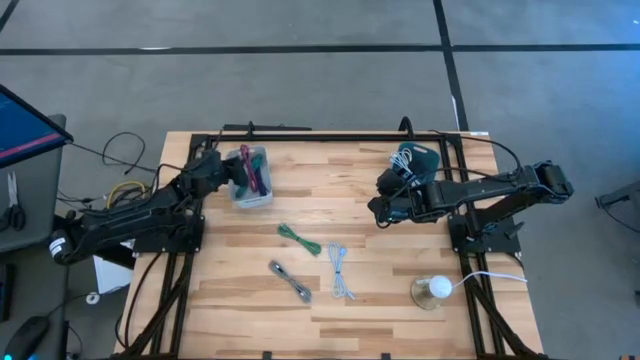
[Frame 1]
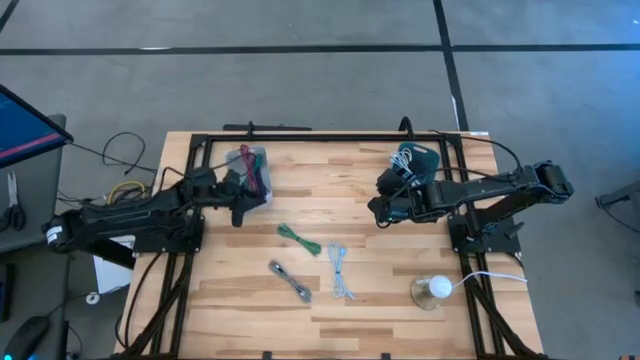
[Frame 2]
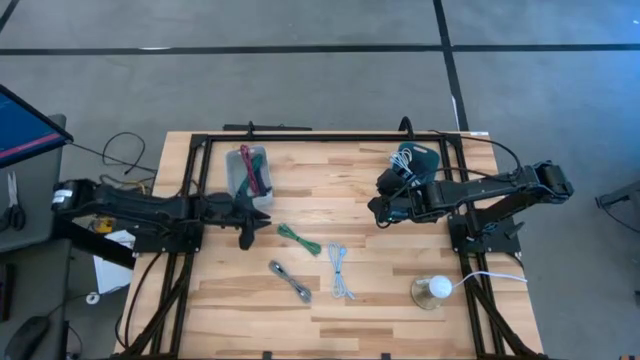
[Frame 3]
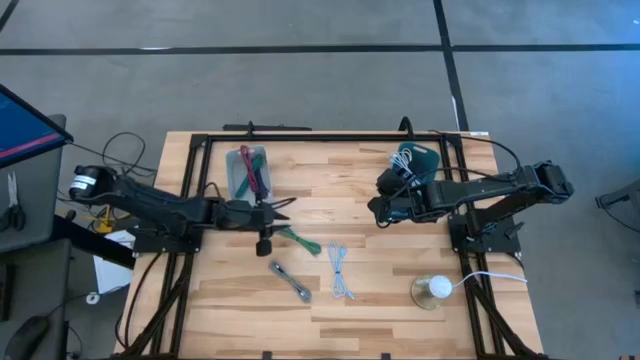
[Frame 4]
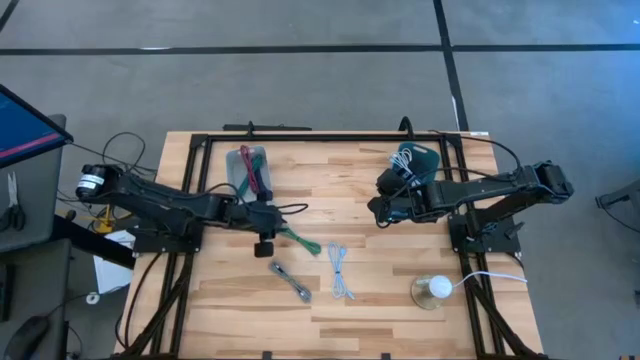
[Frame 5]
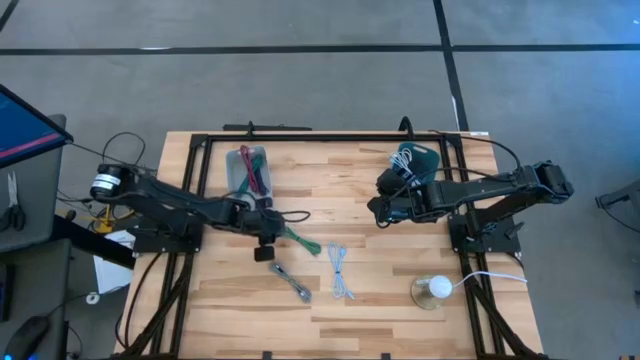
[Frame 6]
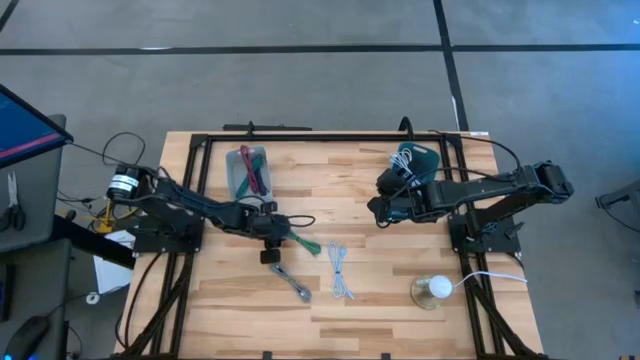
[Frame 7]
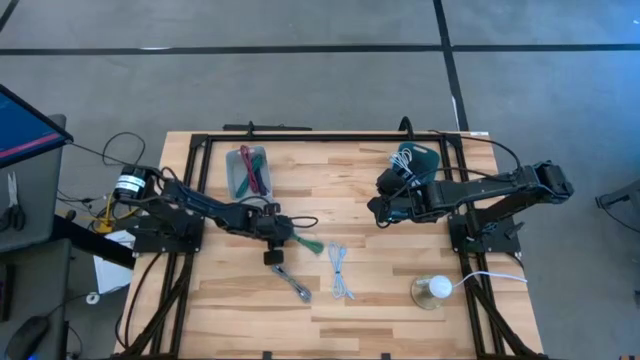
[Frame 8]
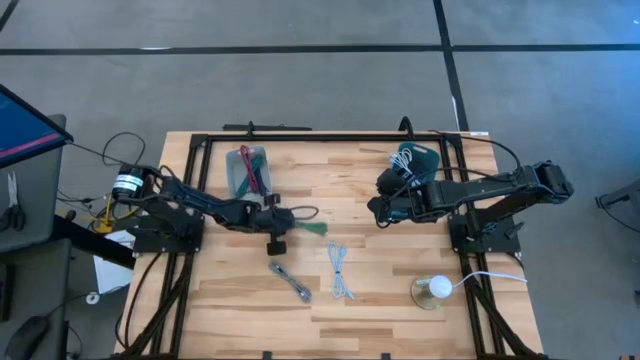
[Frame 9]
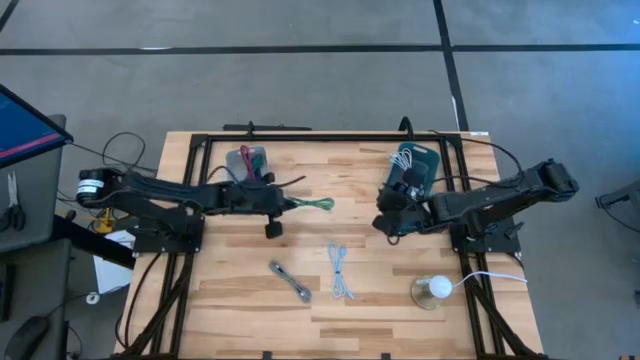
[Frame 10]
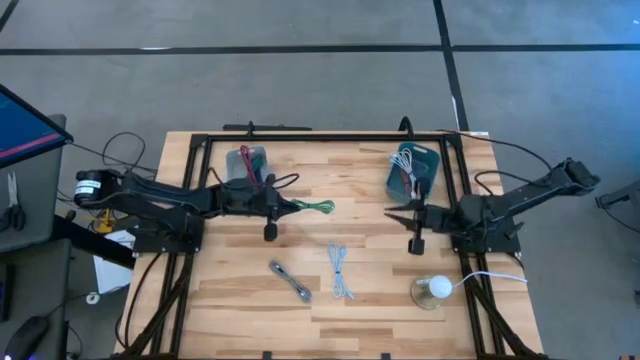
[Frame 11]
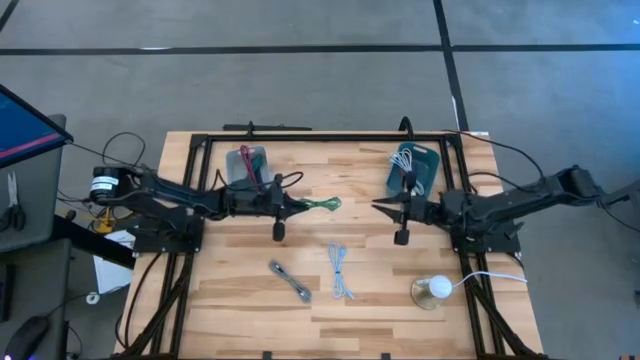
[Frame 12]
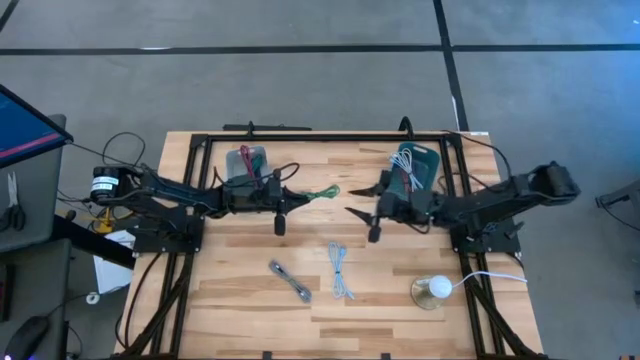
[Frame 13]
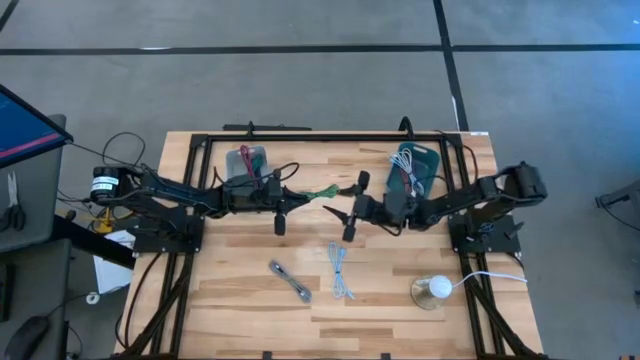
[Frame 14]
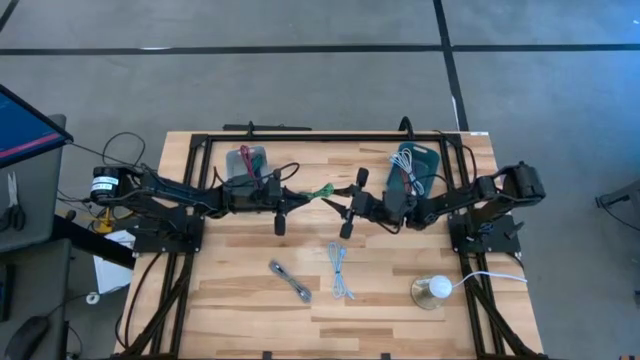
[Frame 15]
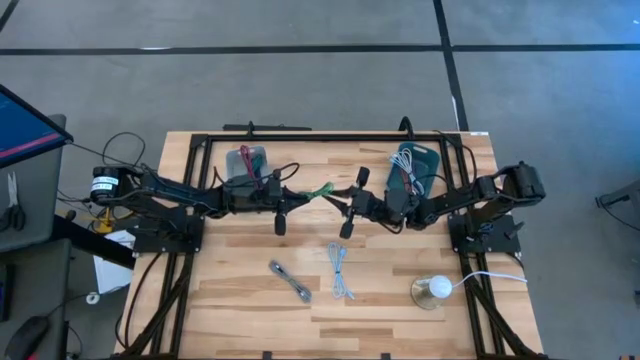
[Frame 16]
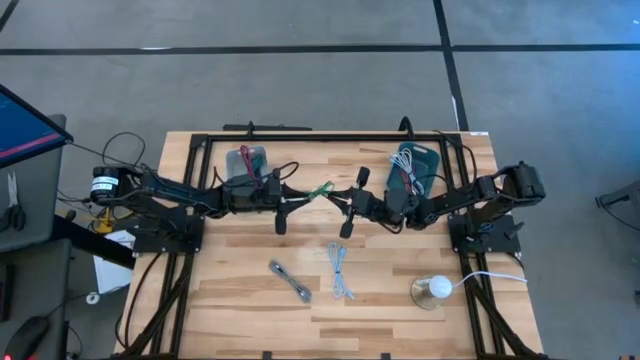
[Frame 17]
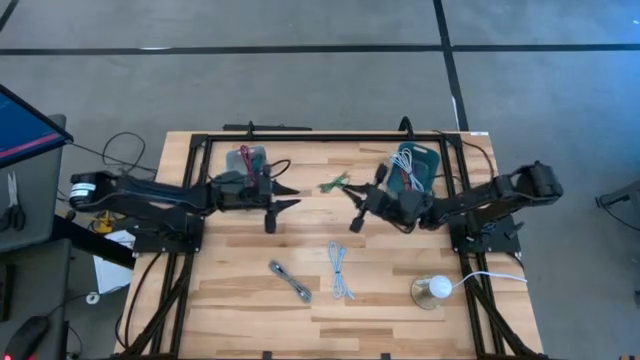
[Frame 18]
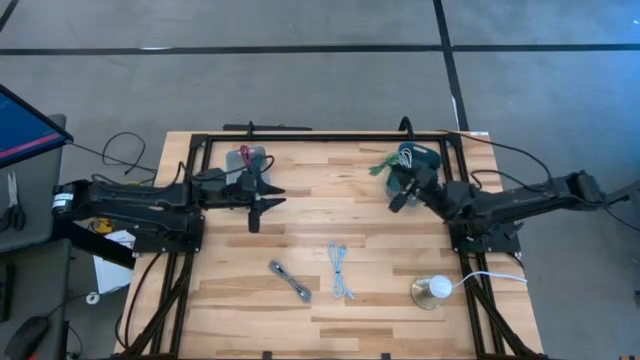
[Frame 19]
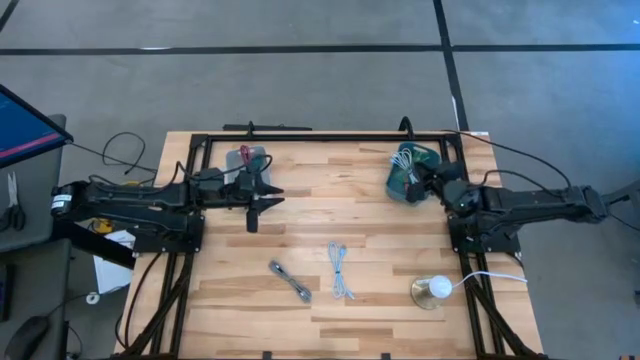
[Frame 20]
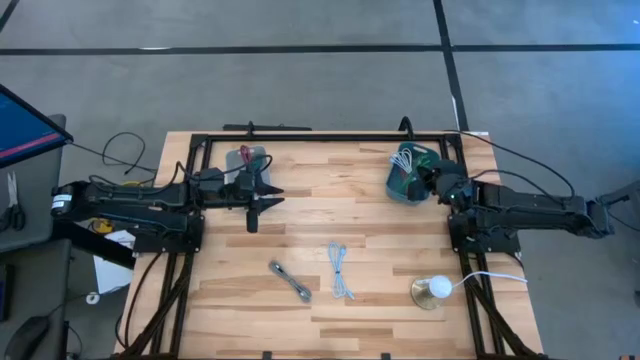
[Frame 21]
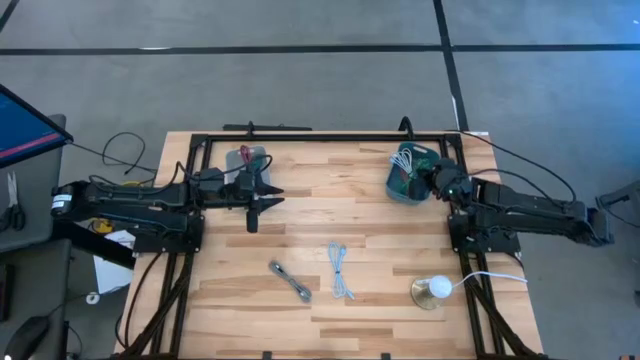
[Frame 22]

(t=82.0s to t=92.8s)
Task: Pick & Place USB Port
Put the green USB cable into the blue bin

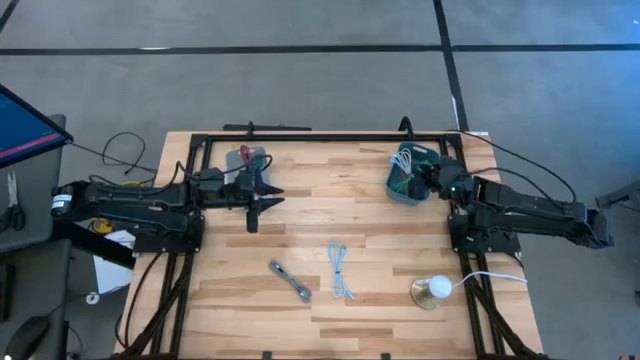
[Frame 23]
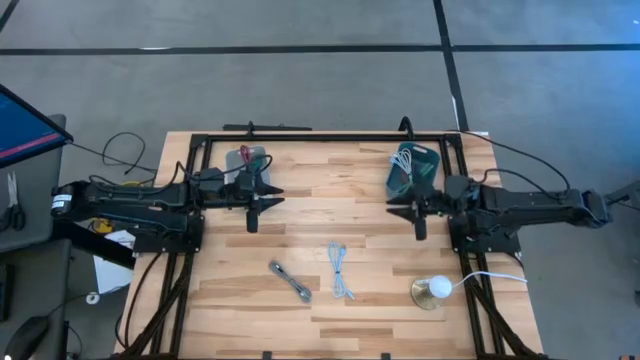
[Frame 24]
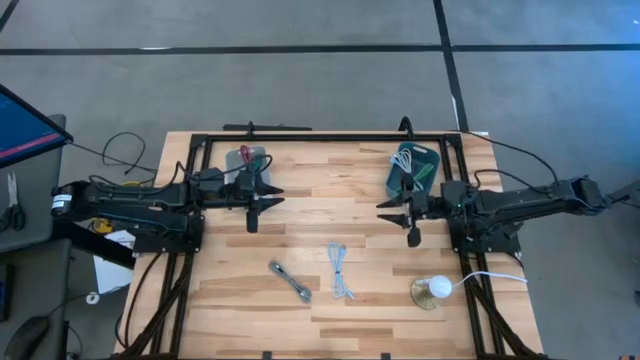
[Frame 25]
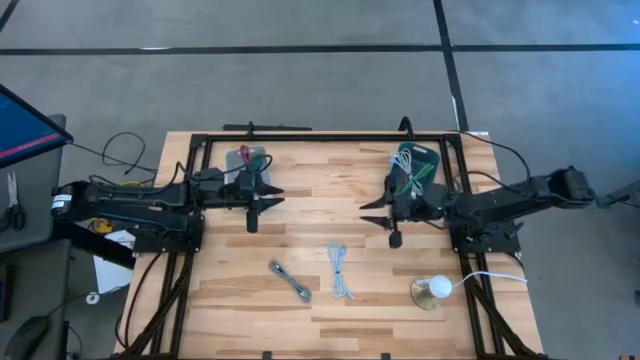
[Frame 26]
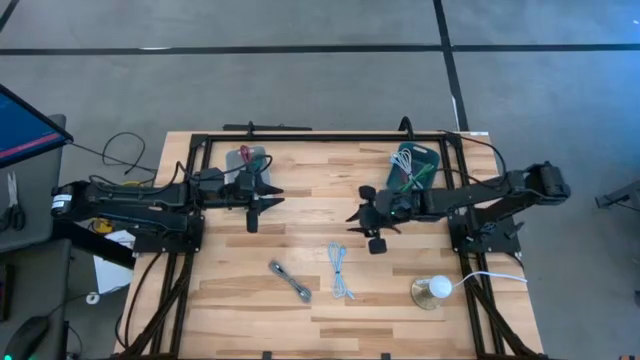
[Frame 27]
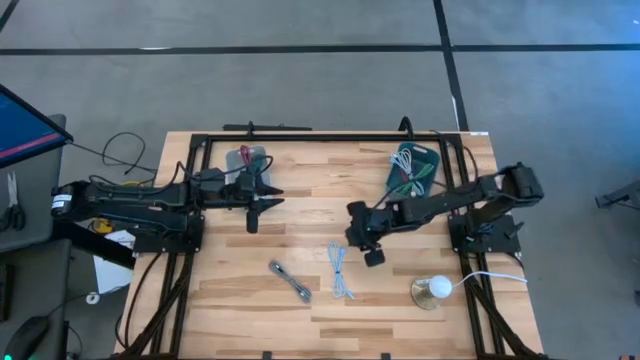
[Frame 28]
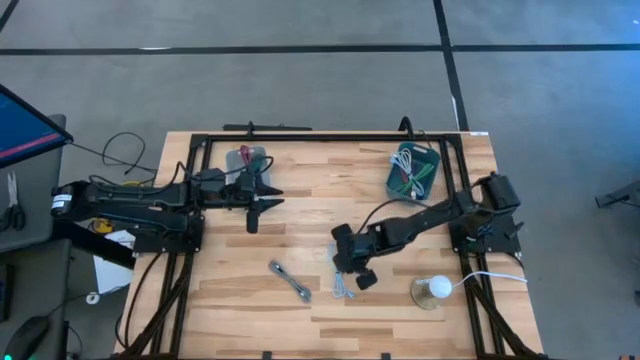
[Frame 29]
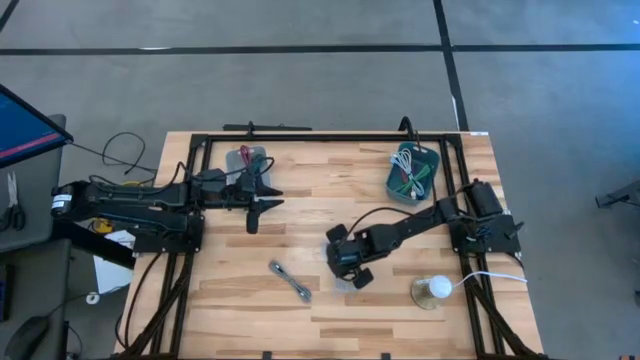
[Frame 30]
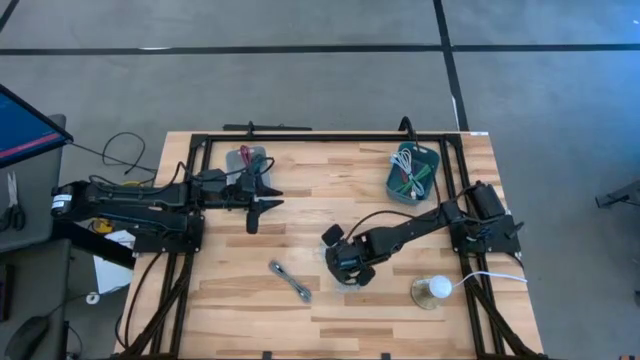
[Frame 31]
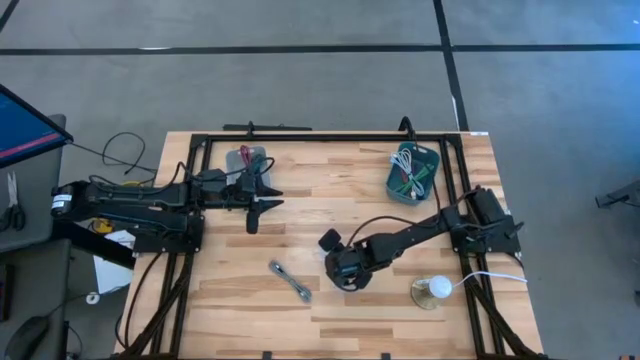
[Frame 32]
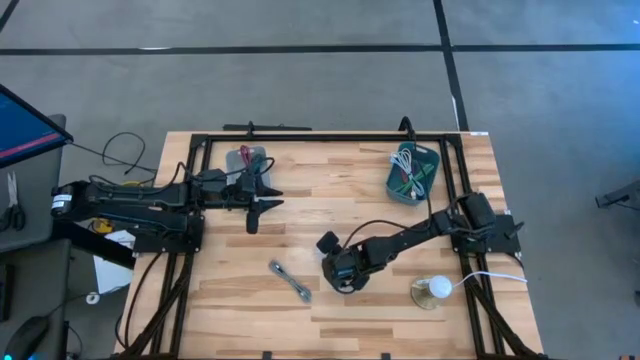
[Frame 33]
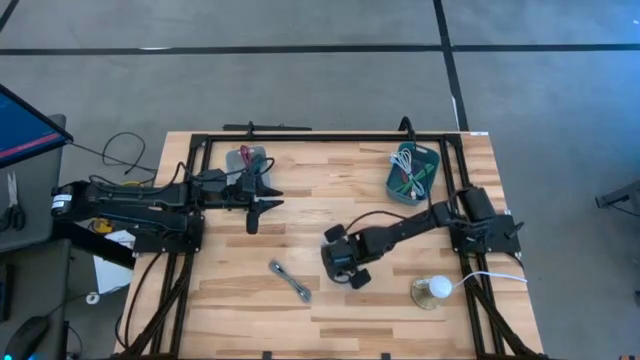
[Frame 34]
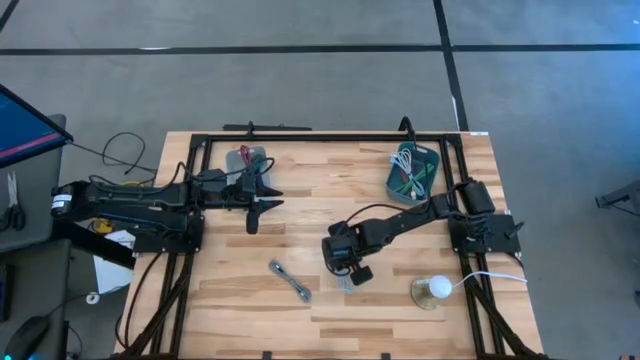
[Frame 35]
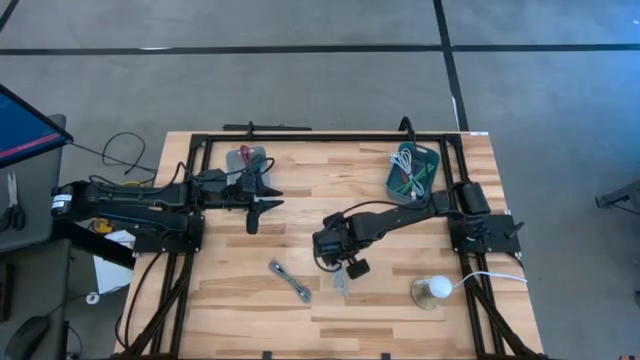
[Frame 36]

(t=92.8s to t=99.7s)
Put the blue USB cable into the blue bin

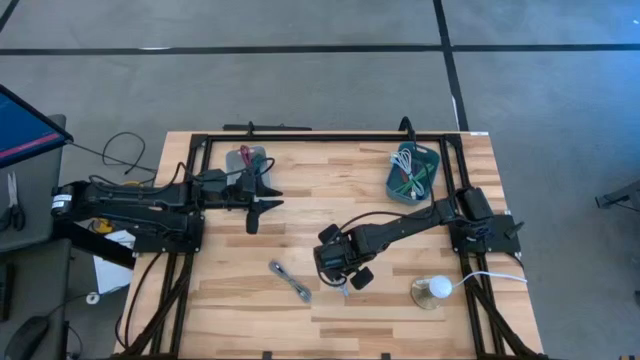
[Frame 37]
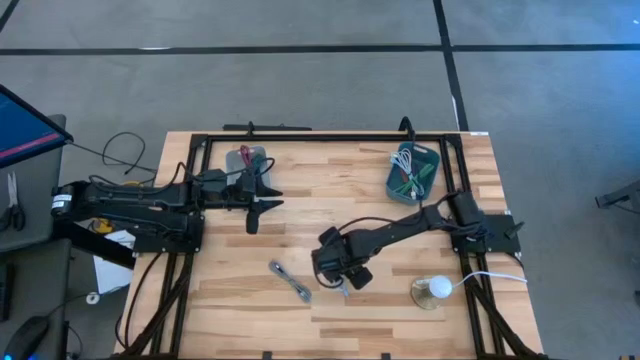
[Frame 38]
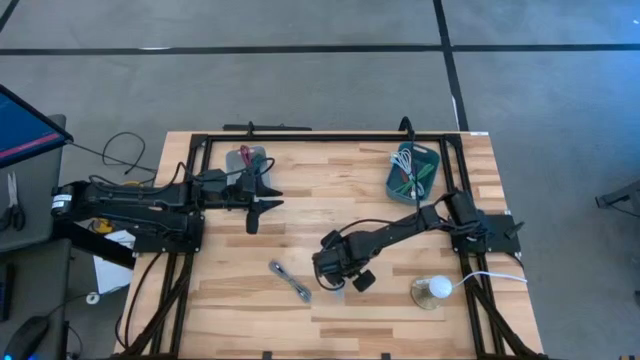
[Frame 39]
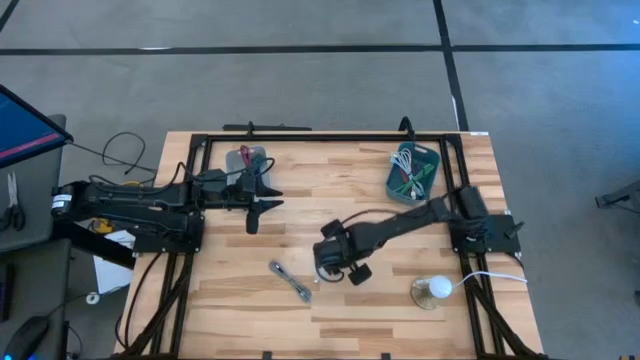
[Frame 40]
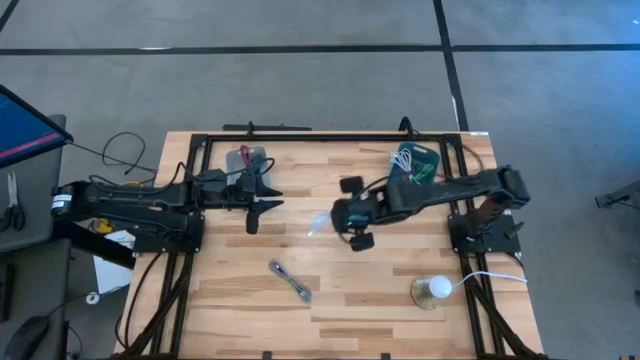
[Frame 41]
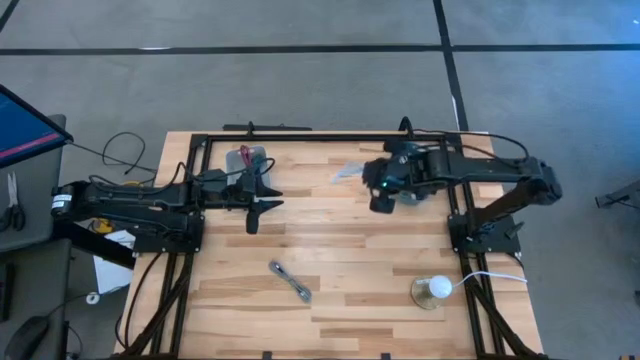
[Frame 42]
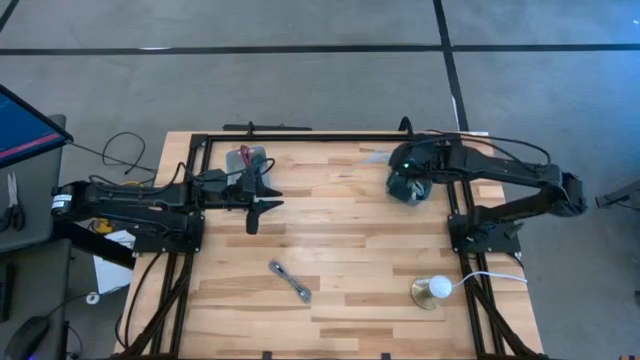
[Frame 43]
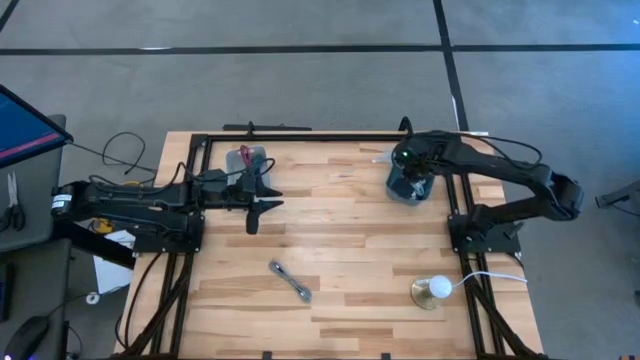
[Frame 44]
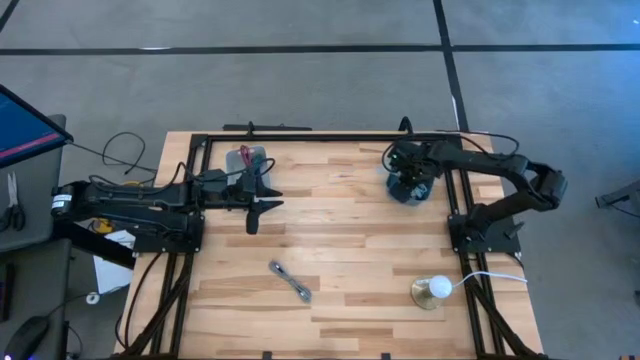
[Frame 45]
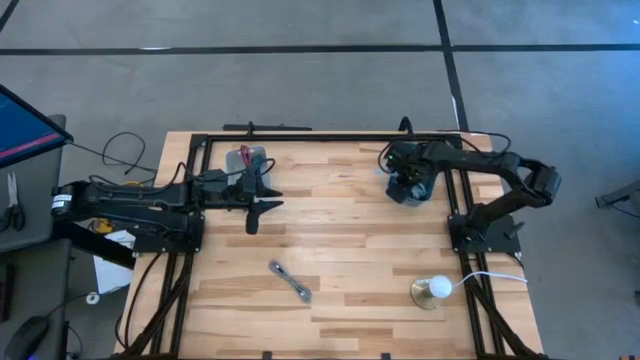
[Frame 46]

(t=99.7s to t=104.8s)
Put the blue USB cable into the blue bin
